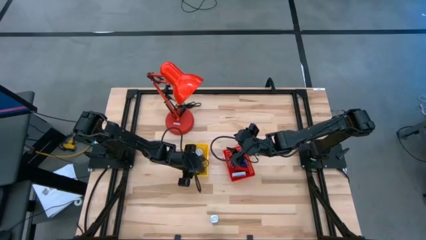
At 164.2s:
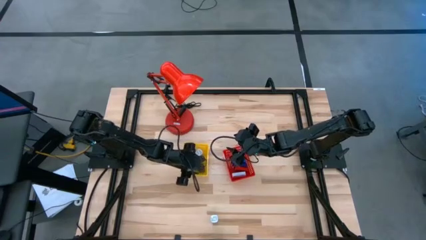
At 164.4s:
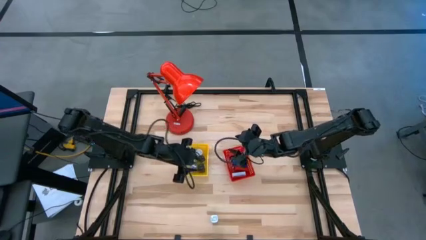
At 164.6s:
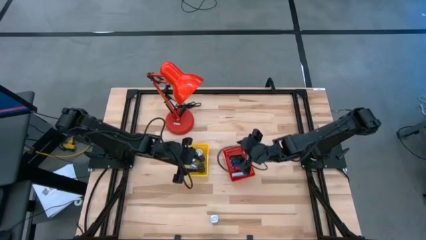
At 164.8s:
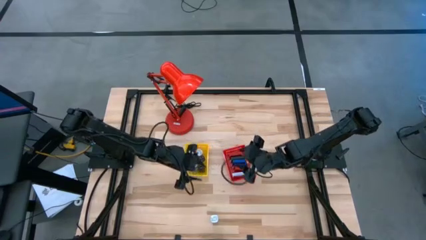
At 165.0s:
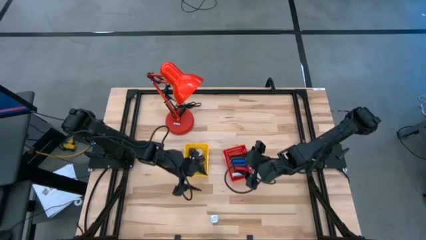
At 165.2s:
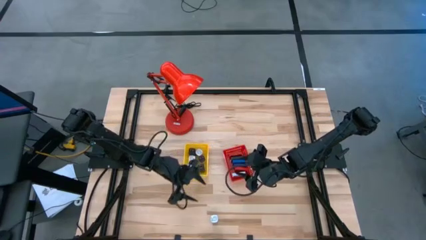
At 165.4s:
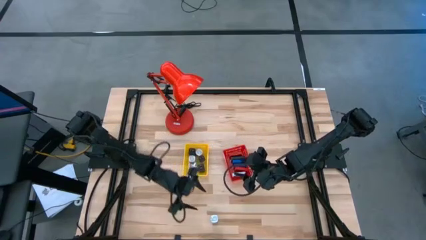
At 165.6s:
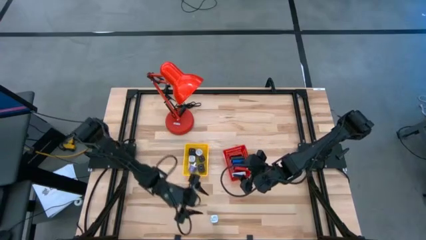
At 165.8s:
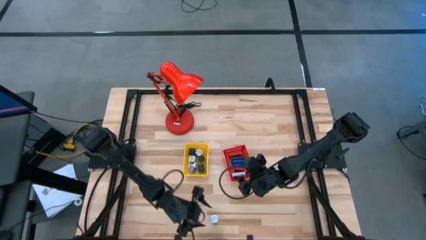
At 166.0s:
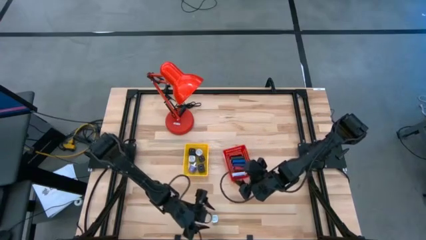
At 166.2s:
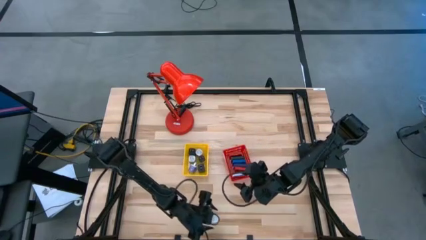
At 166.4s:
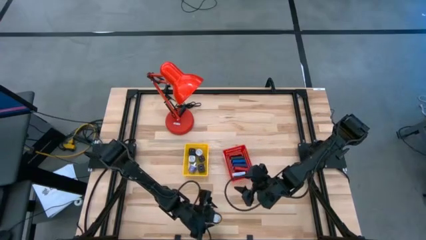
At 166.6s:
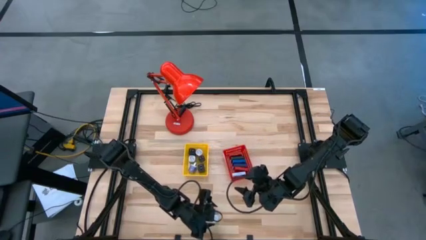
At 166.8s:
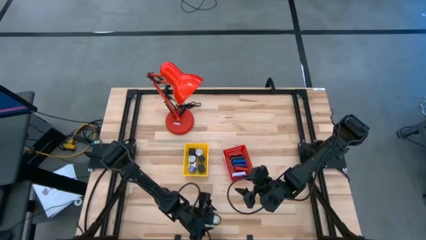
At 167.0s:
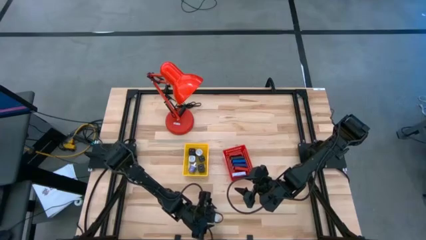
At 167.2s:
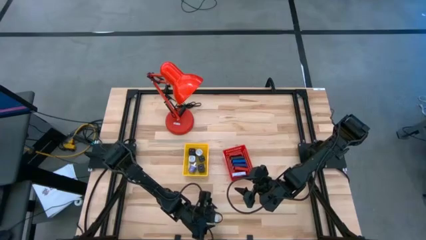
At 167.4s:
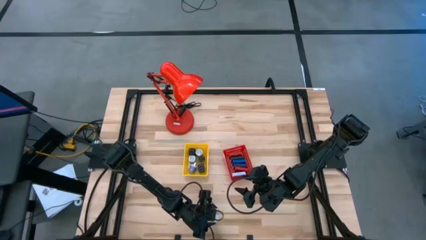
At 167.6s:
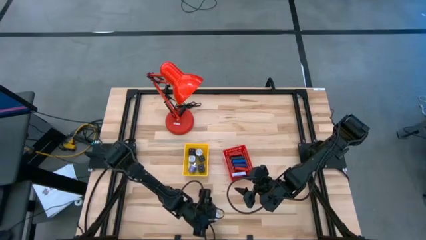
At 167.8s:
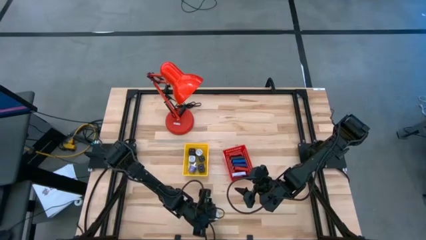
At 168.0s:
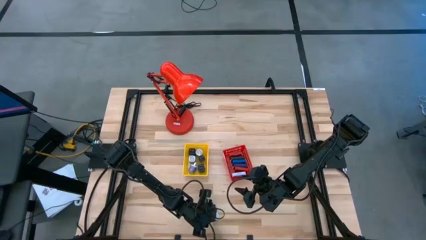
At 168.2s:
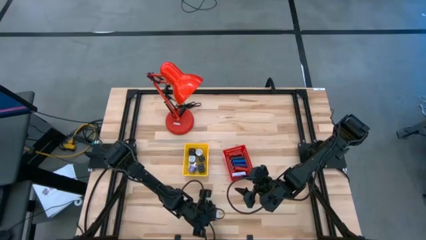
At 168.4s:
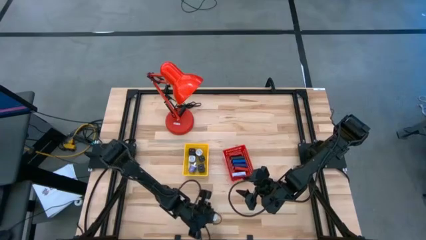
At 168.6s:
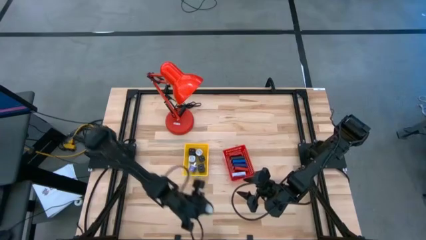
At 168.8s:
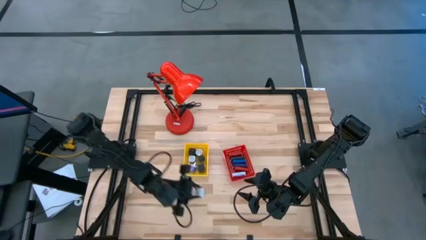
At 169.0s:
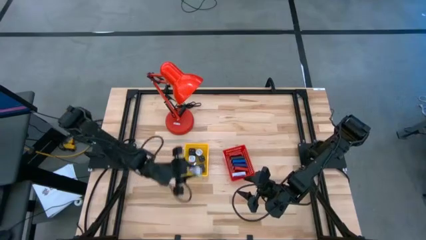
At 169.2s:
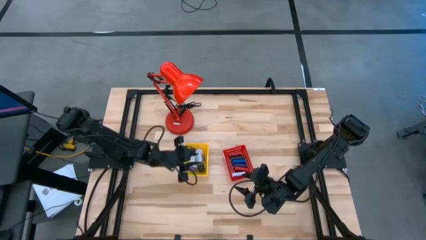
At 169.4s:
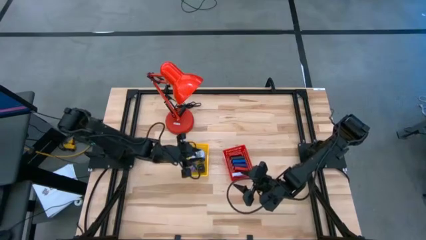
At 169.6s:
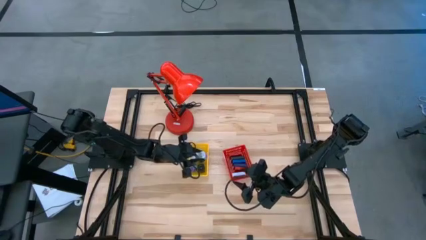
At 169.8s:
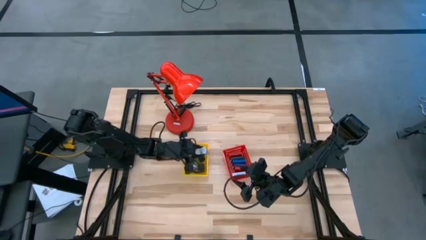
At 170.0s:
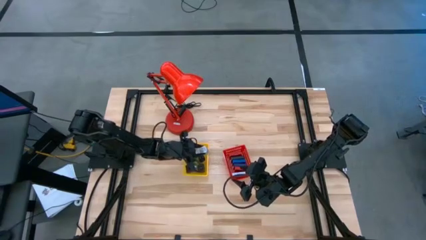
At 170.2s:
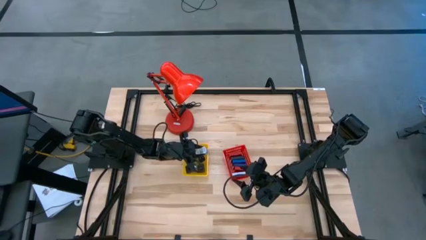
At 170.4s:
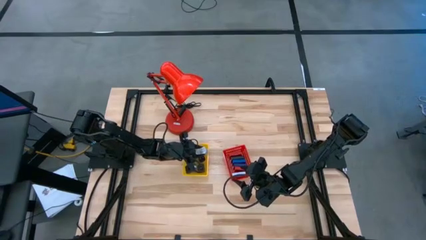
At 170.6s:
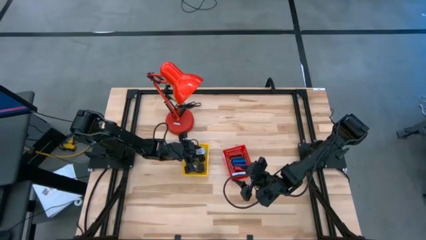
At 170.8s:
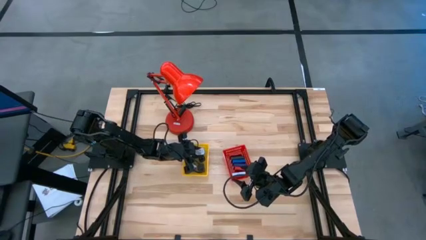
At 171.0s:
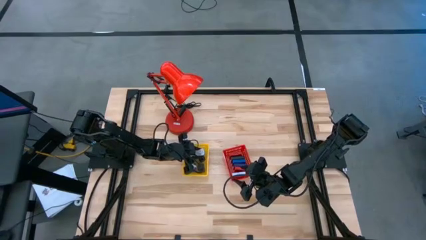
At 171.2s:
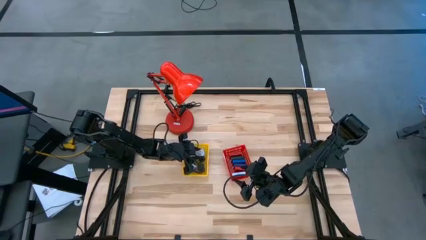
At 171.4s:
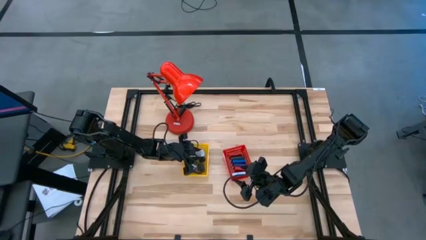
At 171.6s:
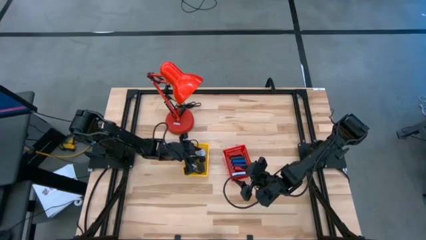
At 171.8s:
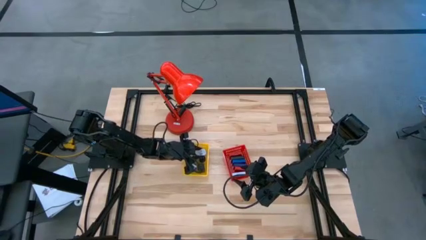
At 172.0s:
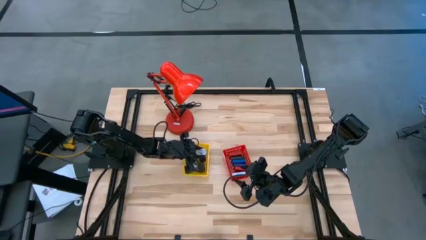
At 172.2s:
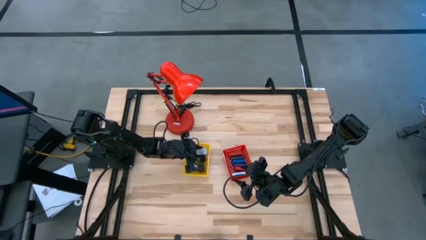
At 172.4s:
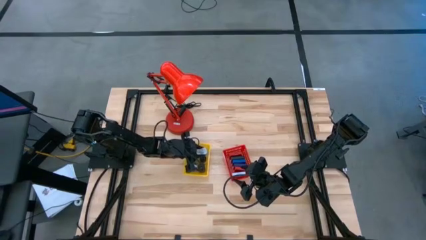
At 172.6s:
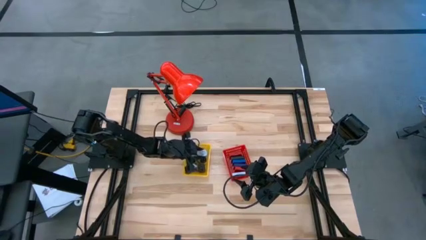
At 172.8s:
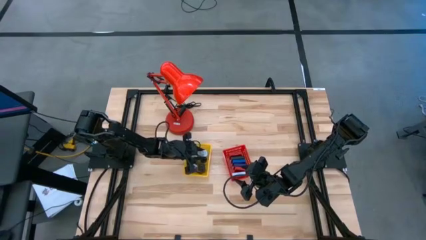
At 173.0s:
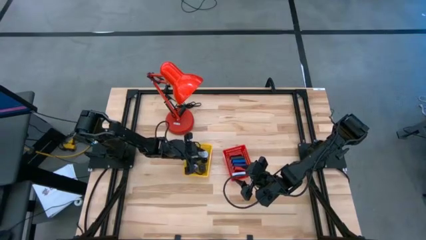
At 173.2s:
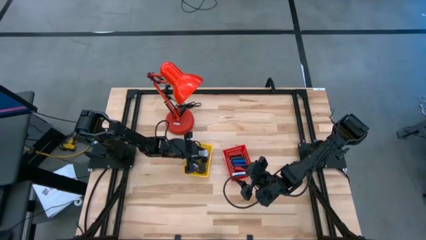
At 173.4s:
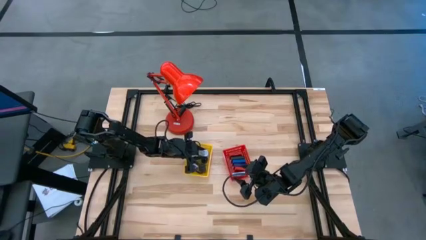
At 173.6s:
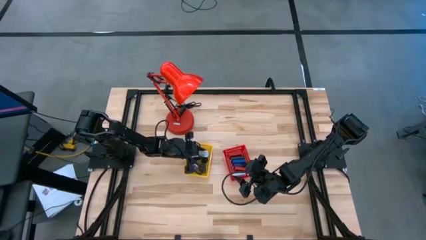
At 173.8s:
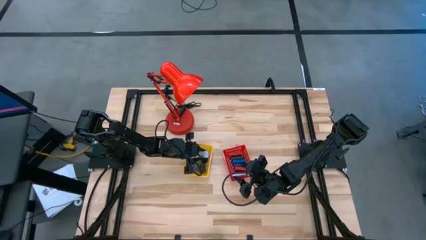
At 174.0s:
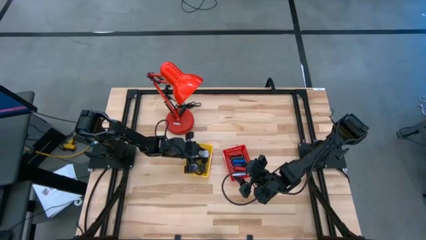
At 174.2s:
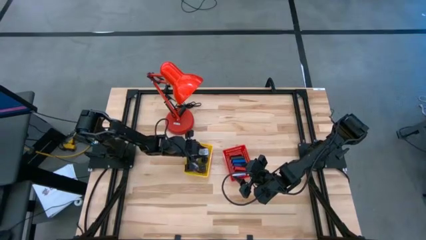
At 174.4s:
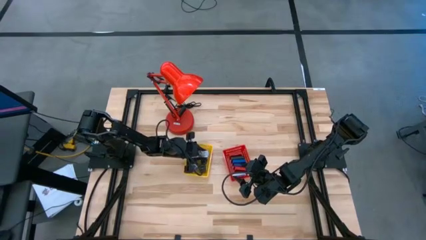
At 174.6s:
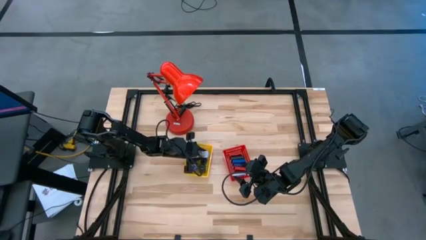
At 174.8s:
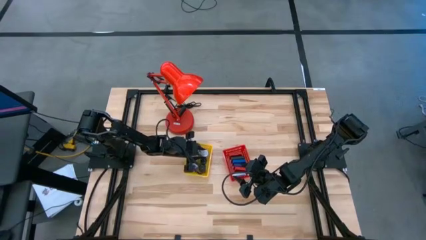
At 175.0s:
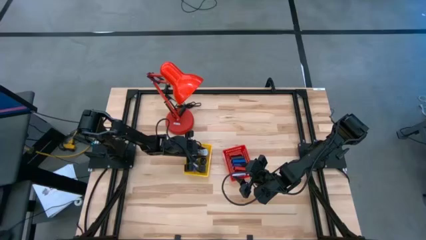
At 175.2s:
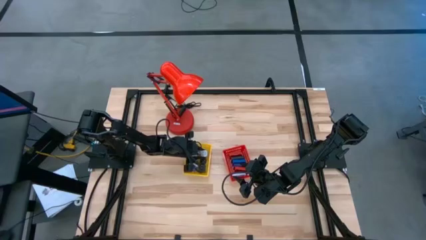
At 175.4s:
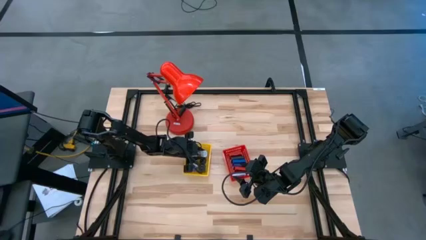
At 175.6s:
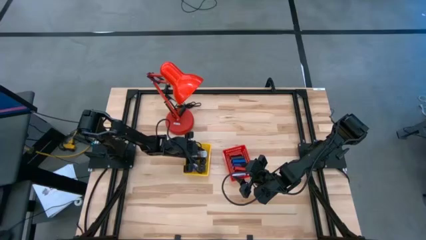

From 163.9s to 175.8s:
Task: Pick & Place Office items
Put the light blue charger adapter into the yellow bin

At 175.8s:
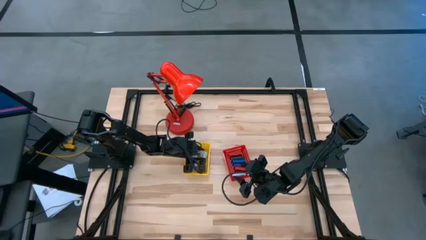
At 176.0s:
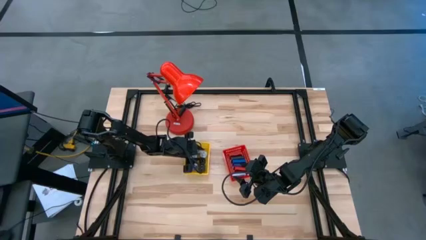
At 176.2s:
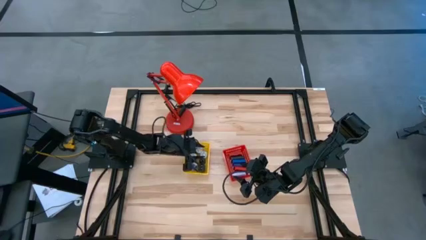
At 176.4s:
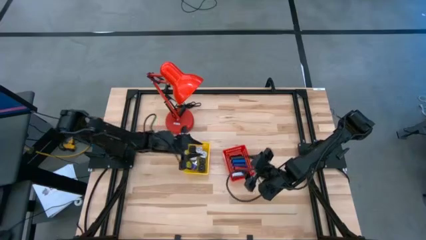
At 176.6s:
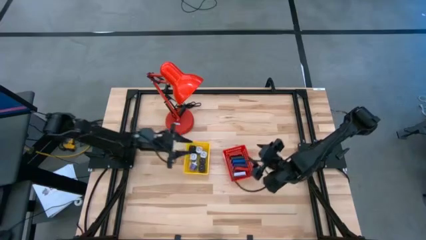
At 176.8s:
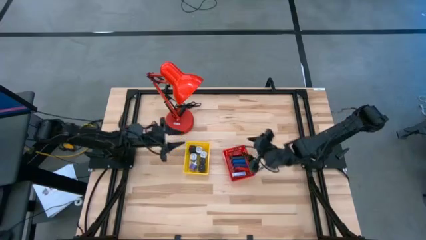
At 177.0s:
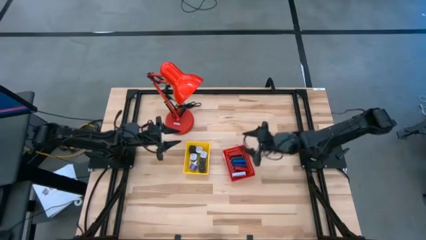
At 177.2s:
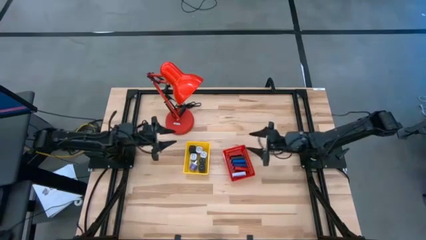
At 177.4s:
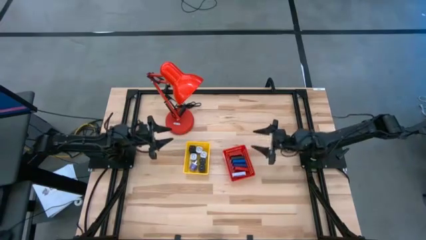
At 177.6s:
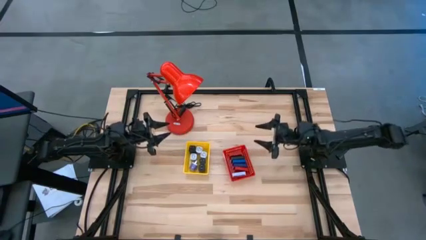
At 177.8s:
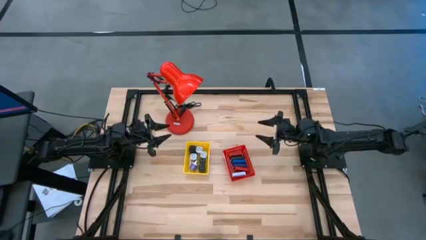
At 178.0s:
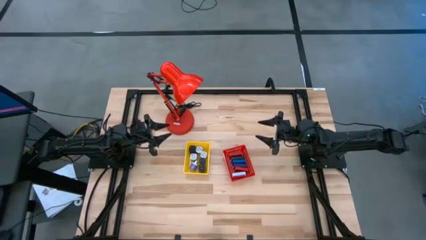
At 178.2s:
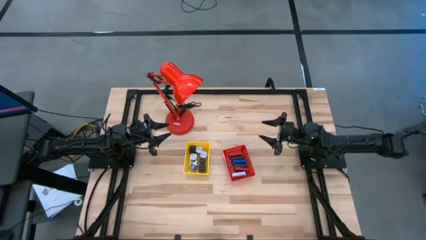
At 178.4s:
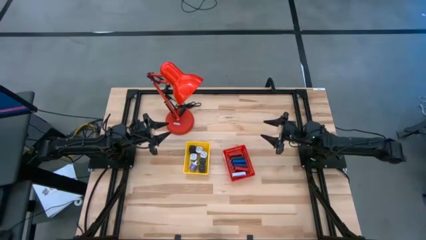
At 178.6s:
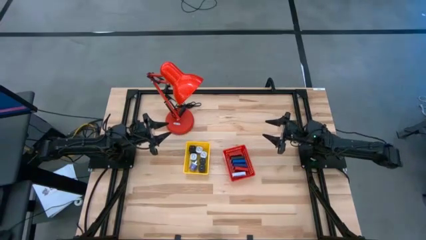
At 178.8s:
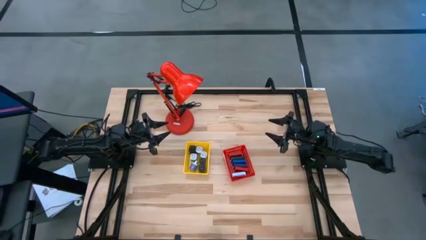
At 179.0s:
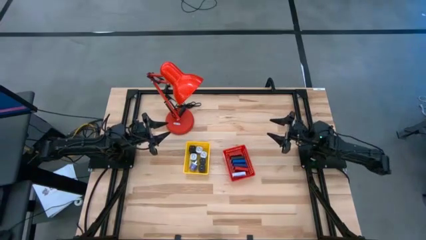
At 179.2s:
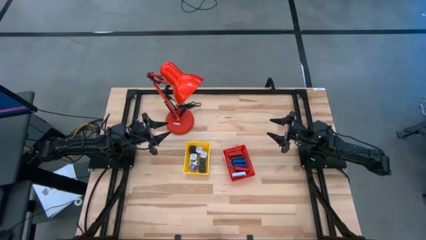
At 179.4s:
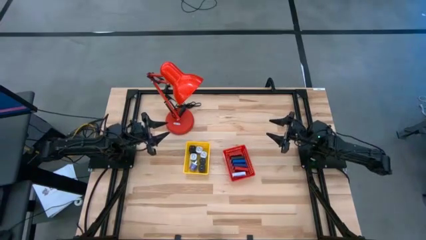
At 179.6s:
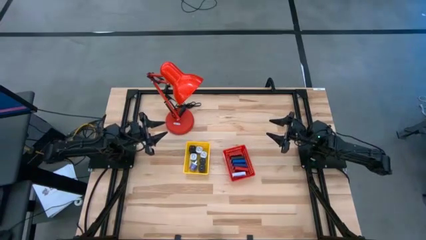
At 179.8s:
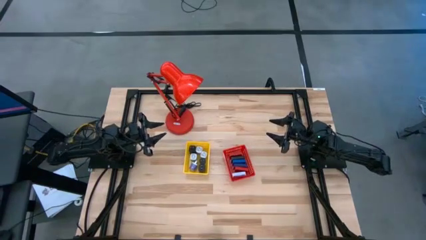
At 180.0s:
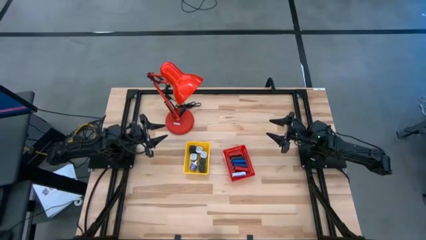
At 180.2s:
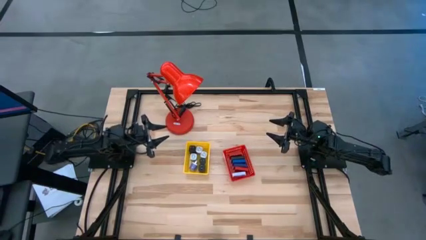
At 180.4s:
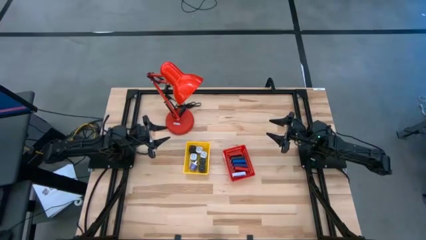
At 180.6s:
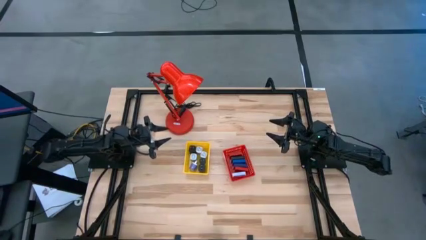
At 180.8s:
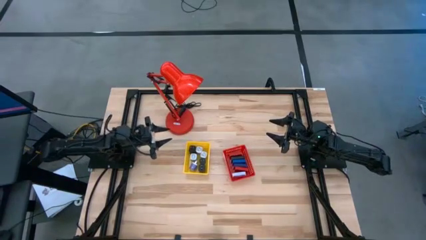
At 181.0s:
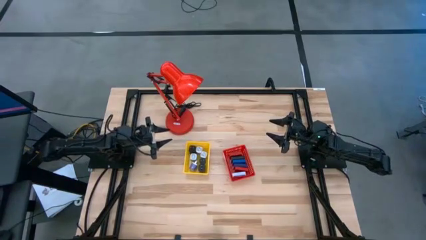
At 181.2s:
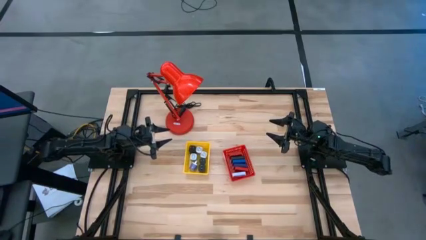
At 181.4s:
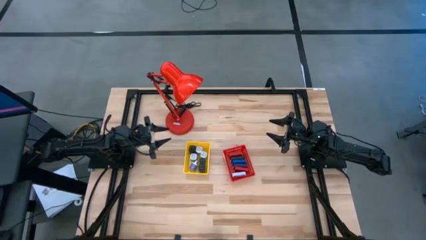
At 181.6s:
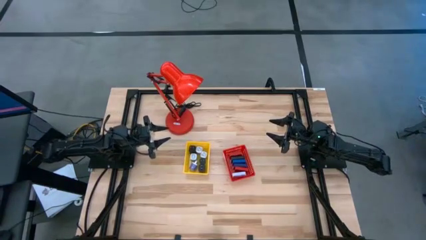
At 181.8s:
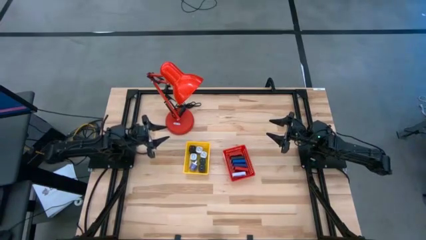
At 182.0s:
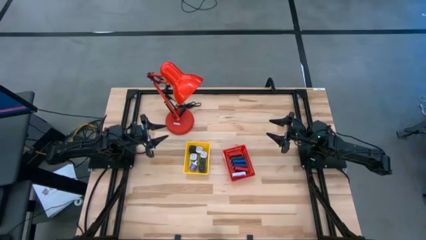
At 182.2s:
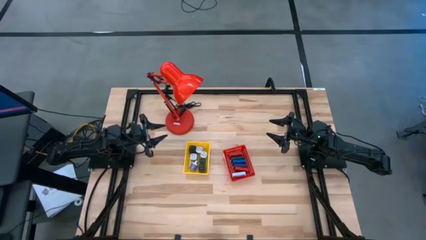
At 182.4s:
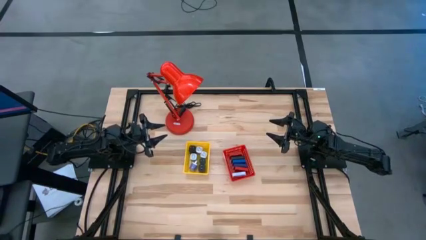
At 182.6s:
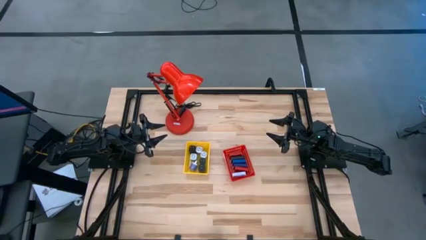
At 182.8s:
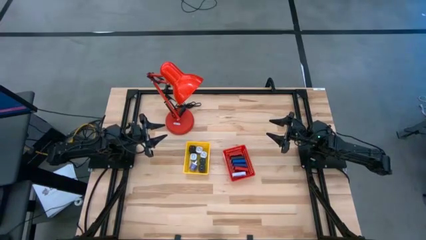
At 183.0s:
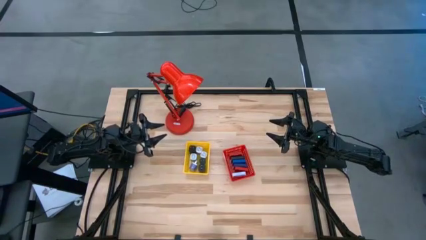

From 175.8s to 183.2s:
Return to Home Position
